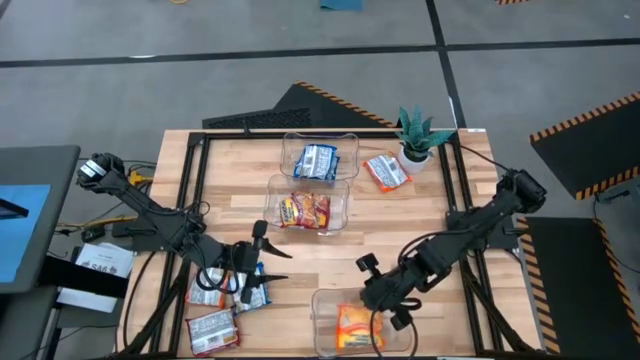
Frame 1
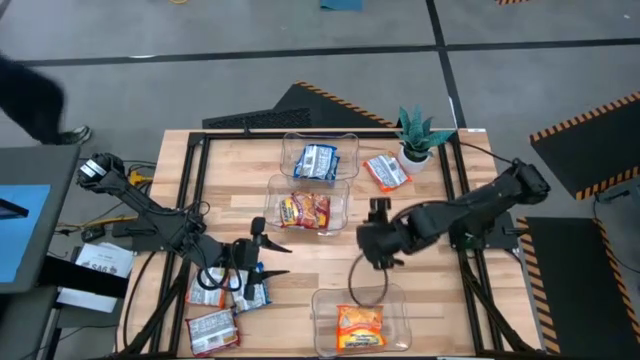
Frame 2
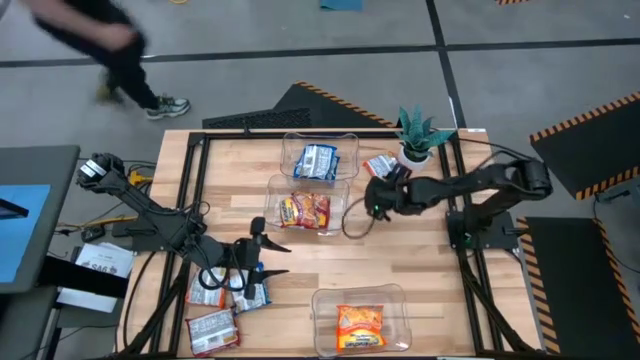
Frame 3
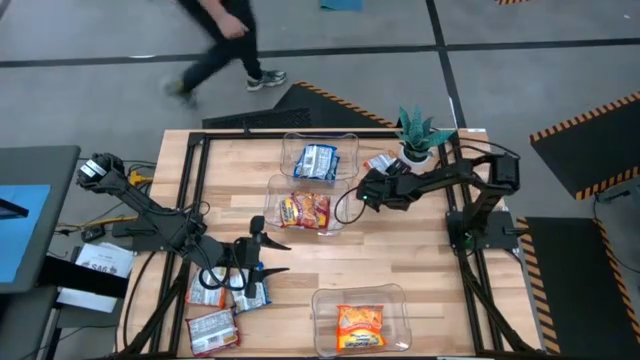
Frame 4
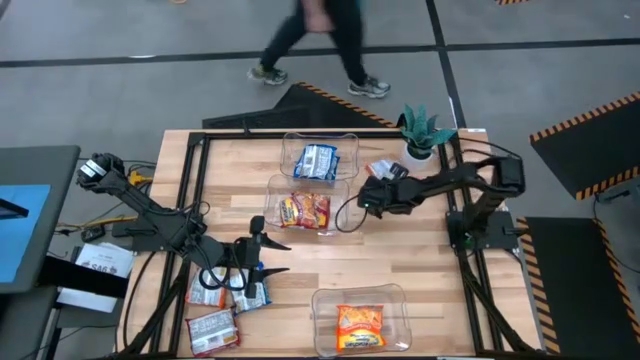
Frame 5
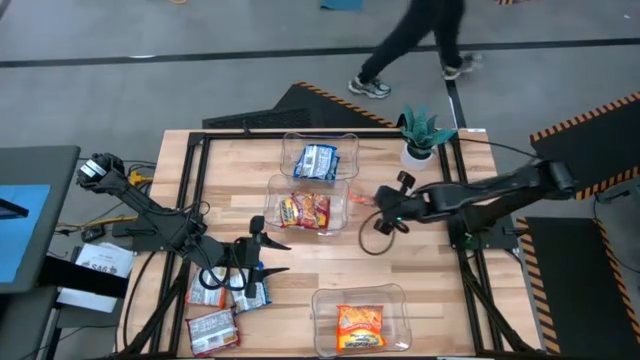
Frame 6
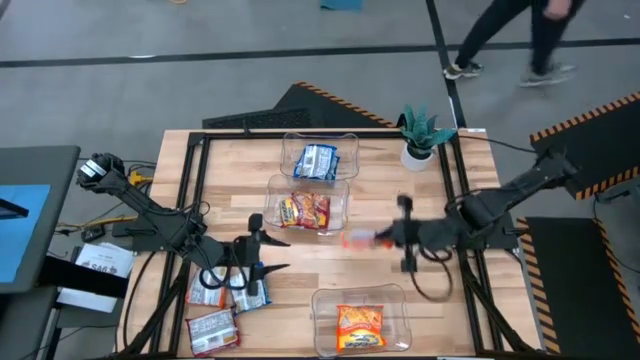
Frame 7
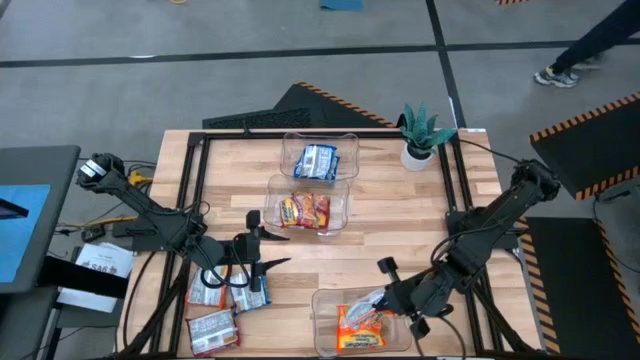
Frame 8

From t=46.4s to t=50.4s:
Task: Sort Maruchan noodles
Put the top orange noodle pack into the bottom transparent bin

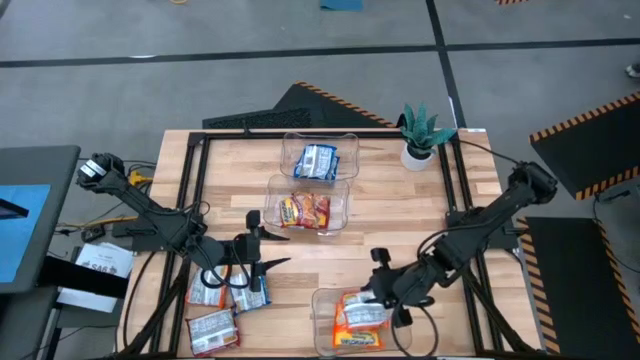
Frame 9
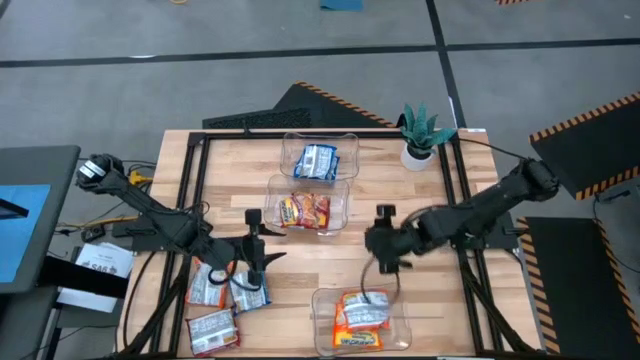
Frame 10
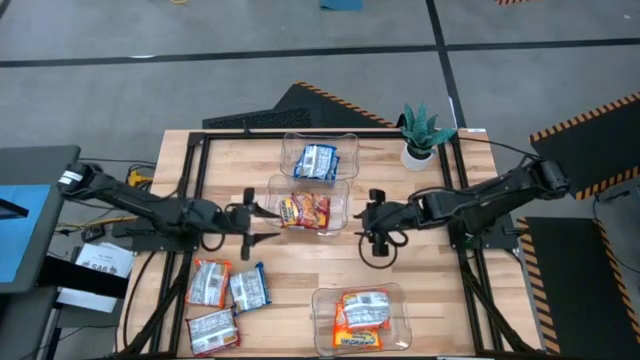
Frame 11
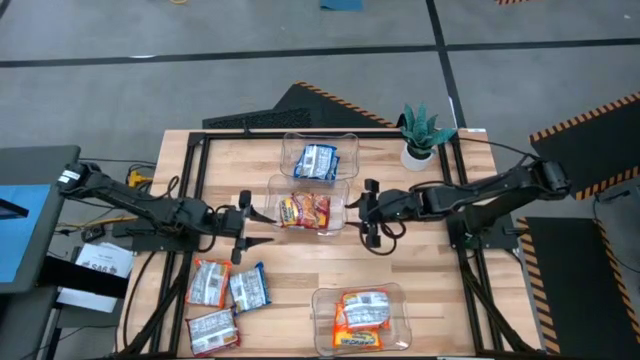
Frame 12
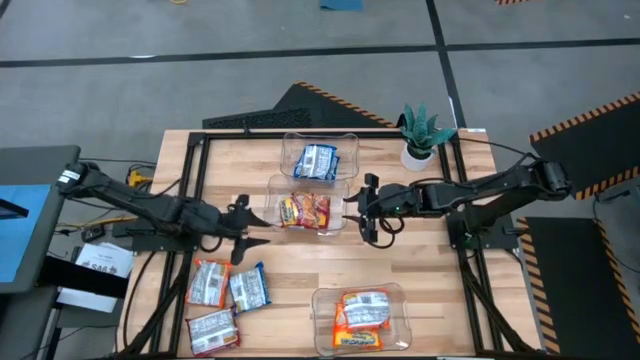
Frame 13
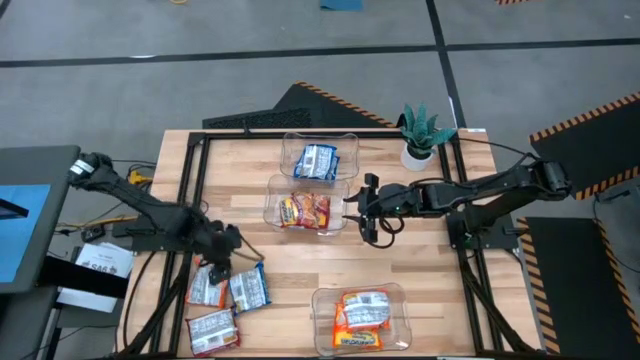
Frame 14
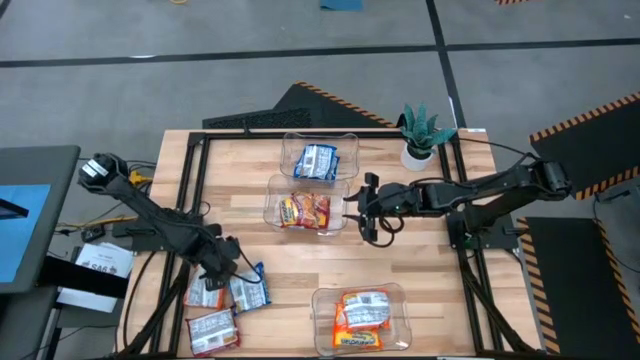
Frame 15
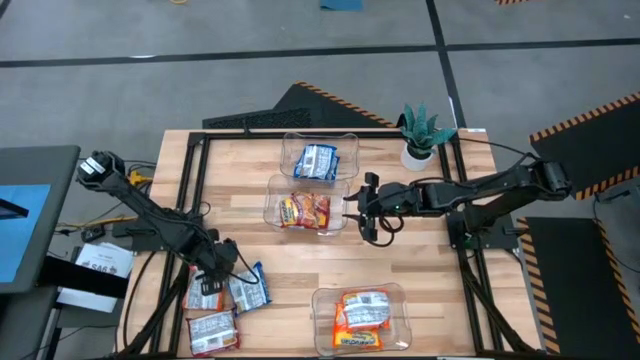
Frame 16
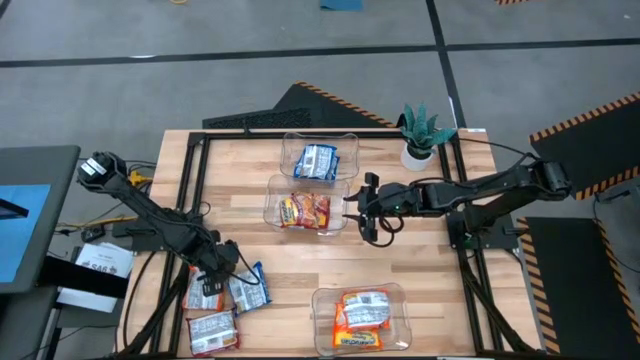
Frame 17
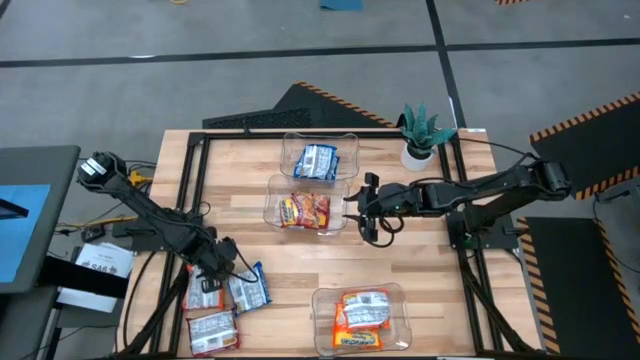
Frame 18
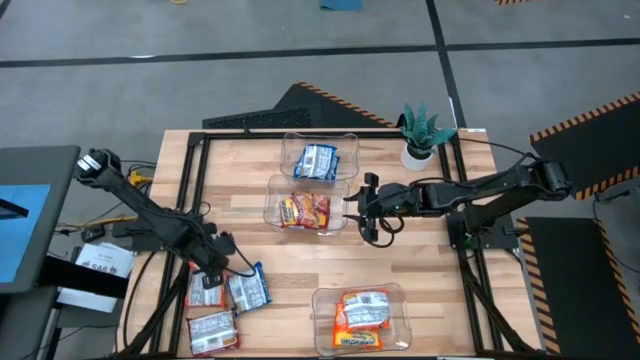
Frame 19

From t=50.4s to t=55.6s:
Put the orange noodle pack into the bottom transparent bin

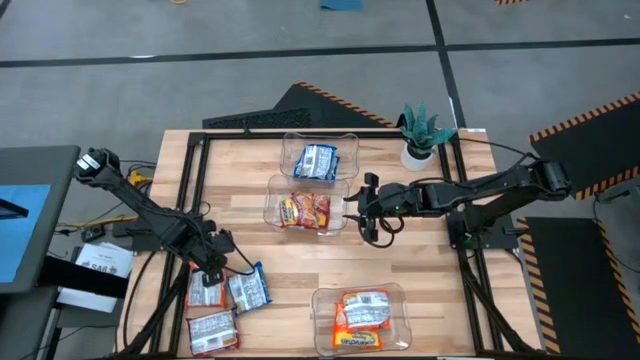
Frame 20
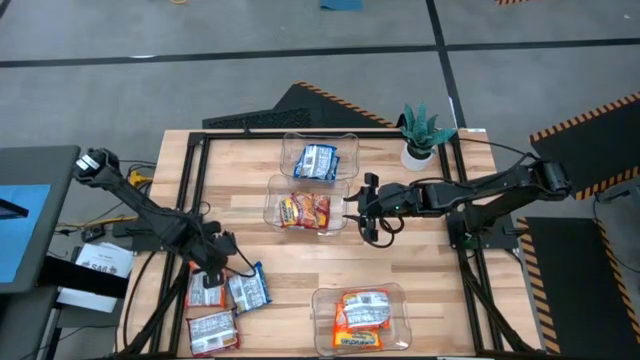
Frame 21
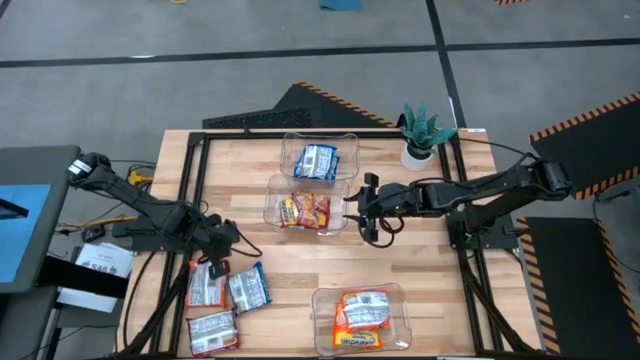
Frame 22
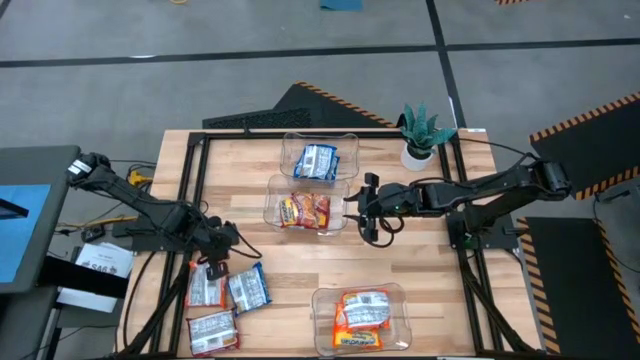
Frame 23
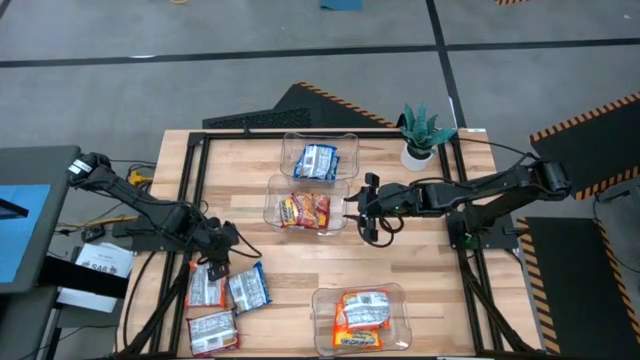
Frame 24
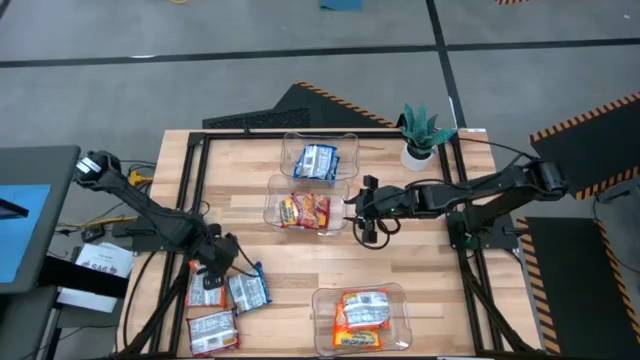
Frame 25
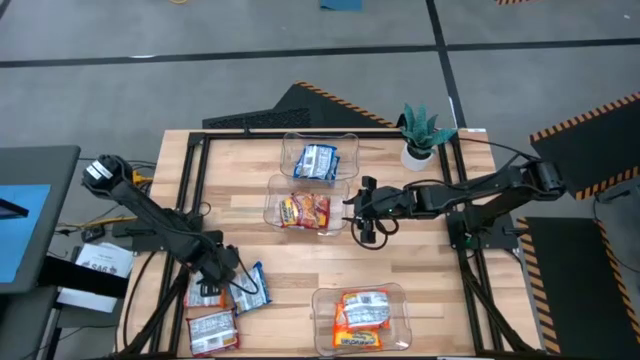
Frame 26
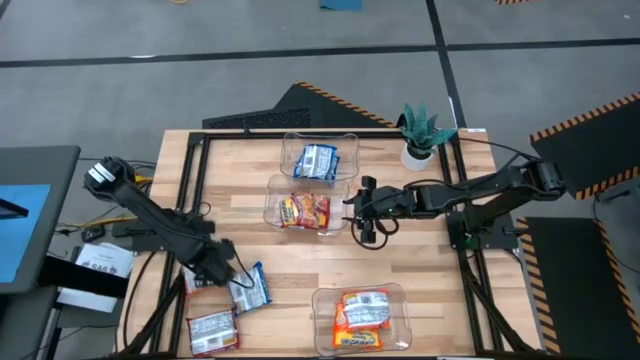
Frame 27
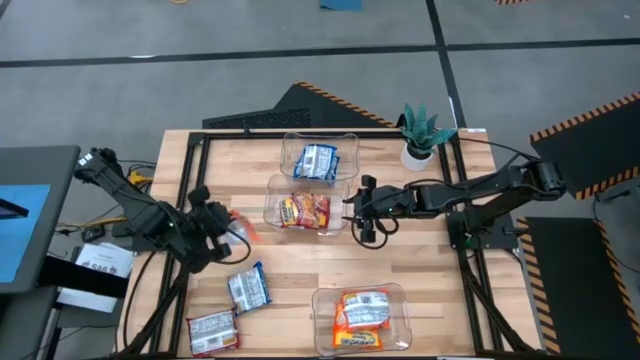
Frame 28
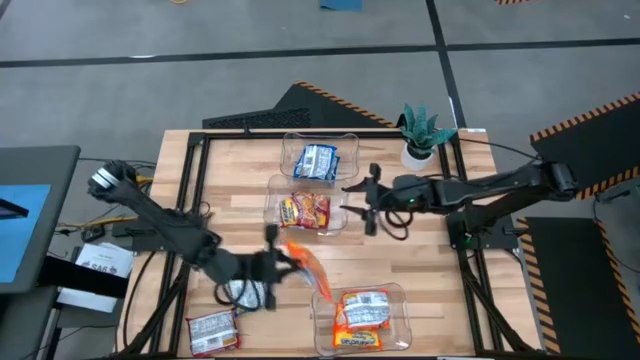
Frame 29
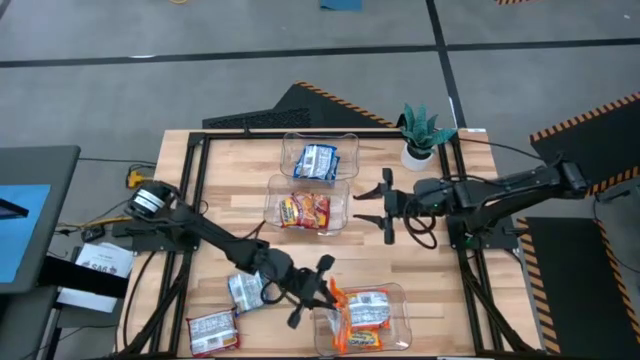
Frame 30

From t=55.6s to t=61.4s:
Put the orange noodle pack into the bottom transparent bin

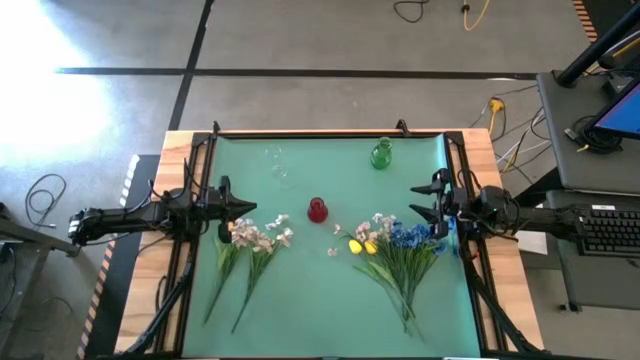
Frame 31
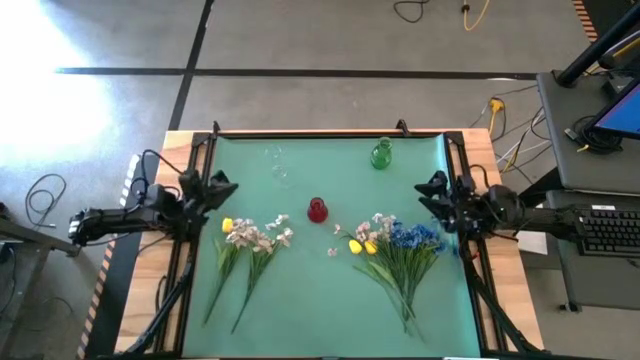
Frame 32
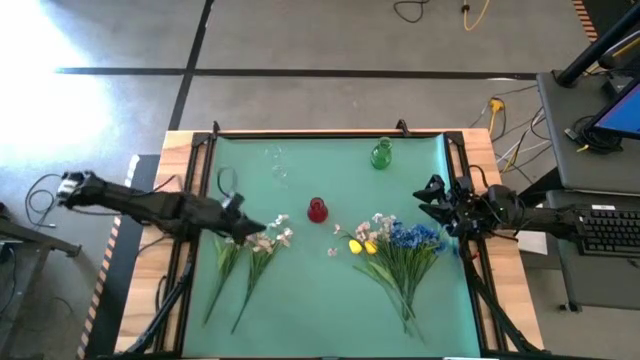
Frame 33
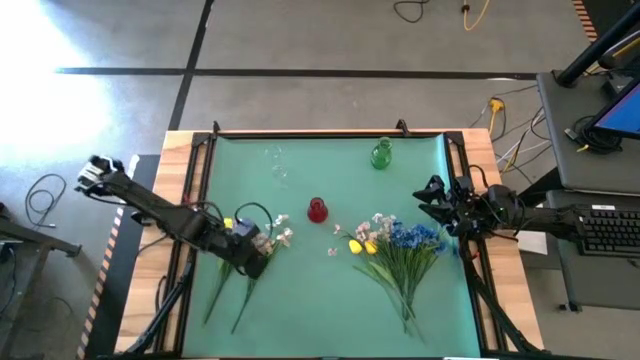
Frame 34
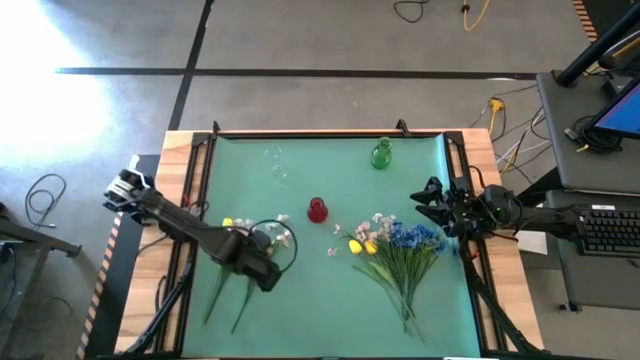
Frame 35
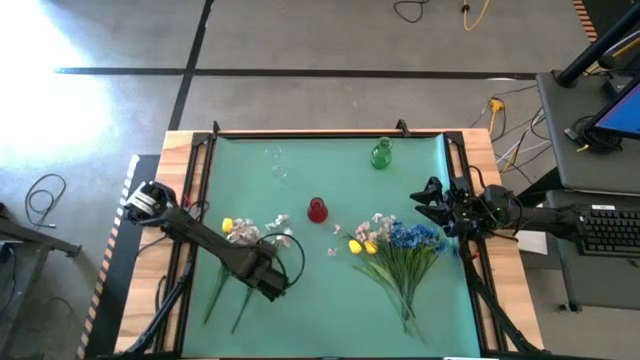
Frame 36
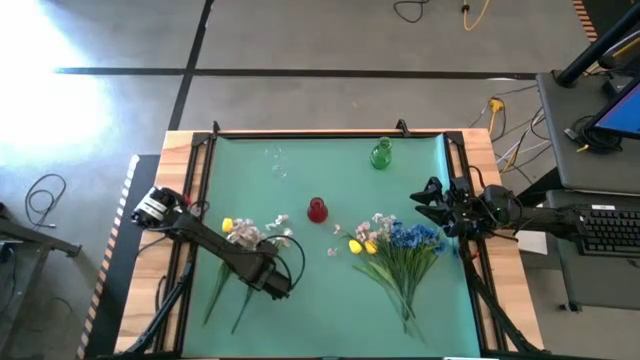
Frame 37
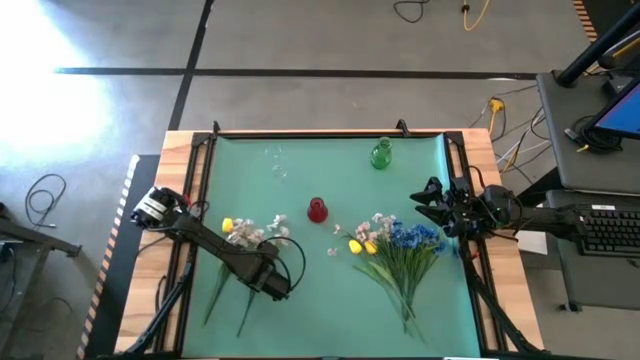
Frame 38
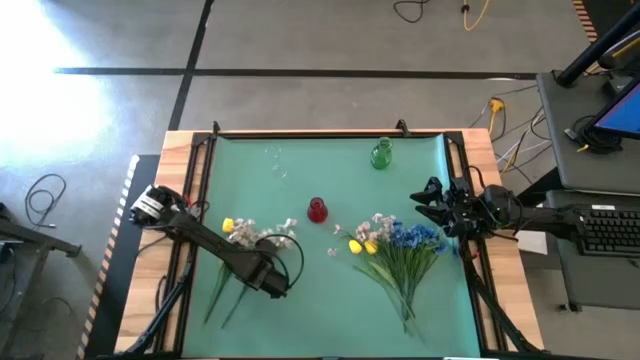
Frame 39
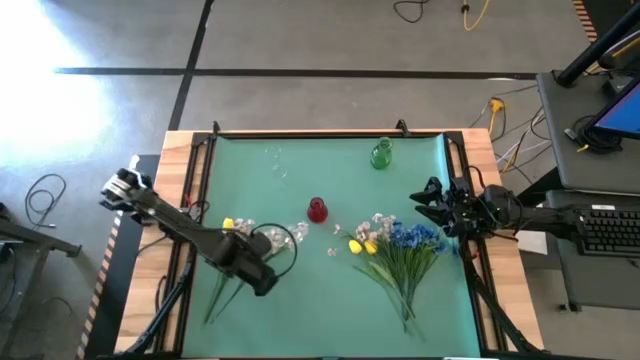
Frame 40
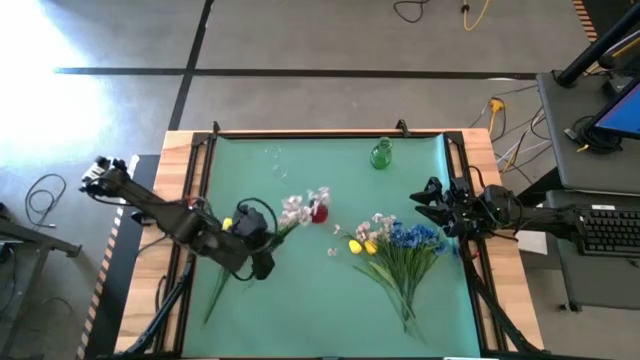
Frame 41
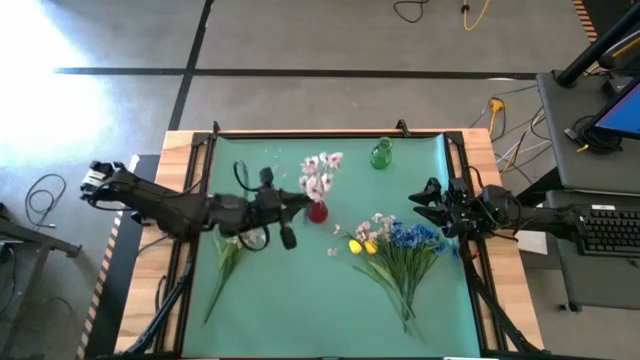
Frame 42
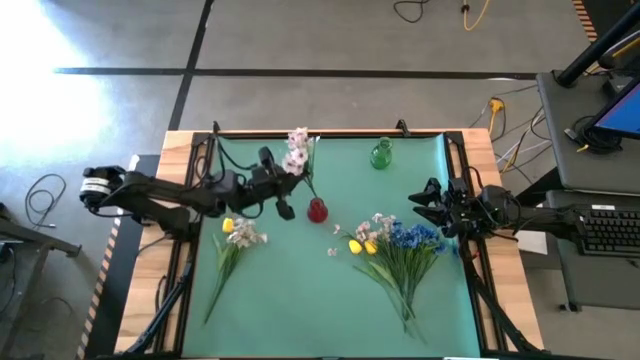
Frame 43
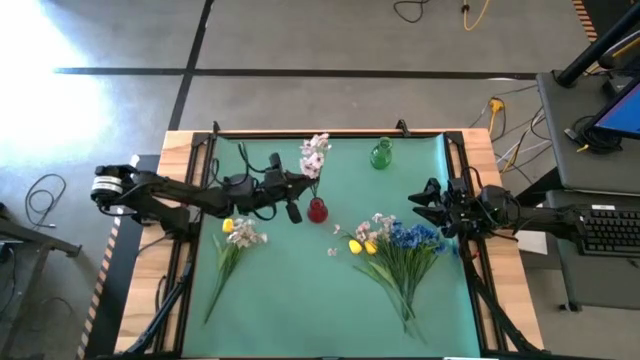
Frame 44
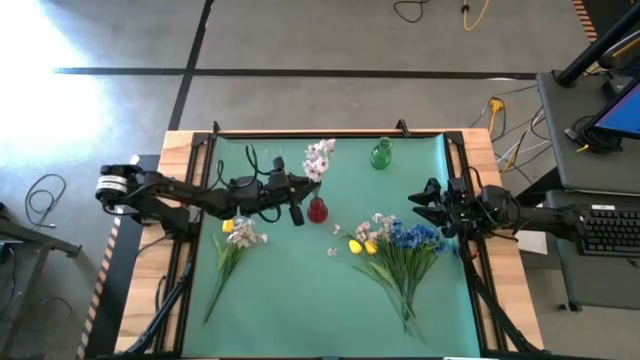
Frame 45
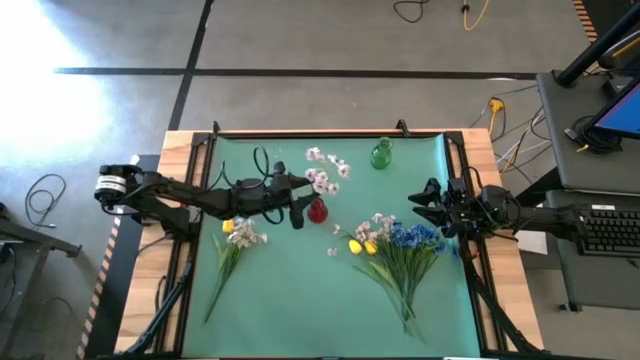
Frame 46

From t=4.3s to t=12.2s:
Task: Sort flowers into vase by color
Put the white flowers into the red vase
